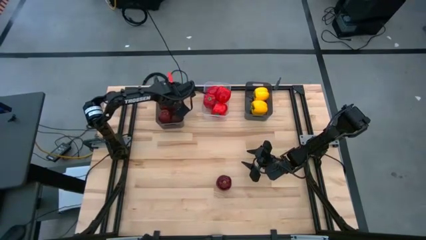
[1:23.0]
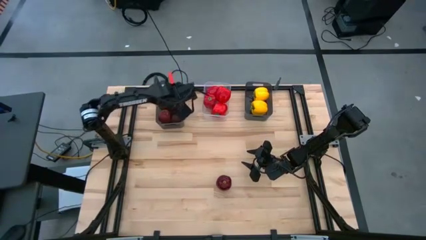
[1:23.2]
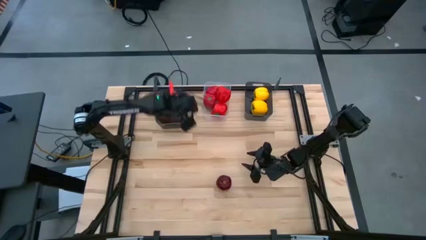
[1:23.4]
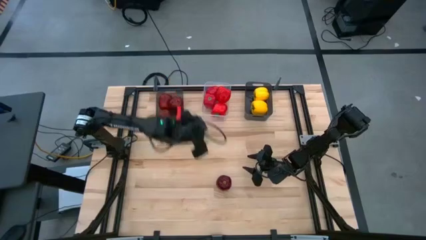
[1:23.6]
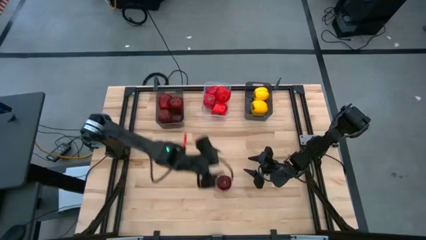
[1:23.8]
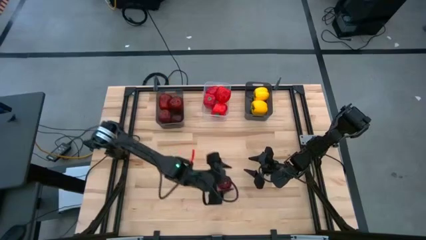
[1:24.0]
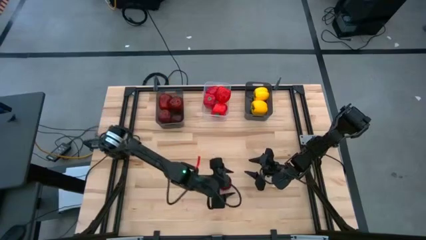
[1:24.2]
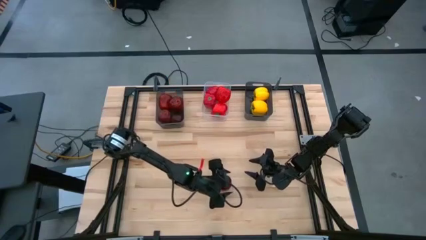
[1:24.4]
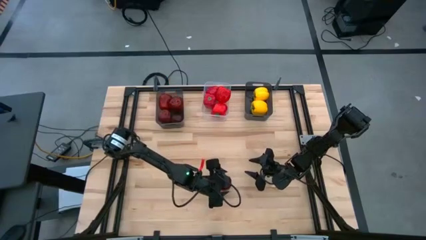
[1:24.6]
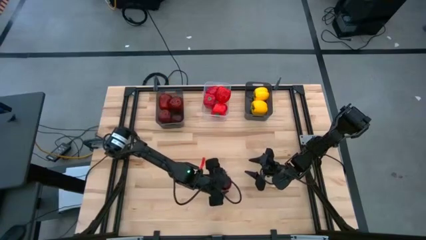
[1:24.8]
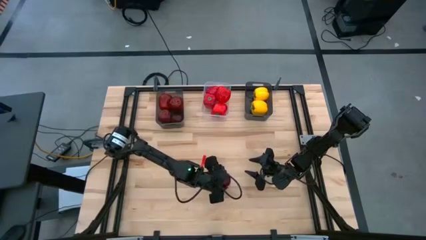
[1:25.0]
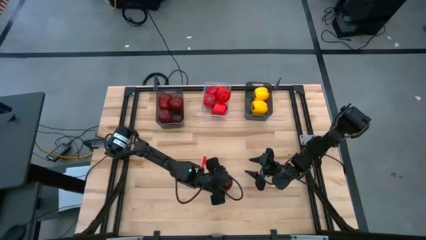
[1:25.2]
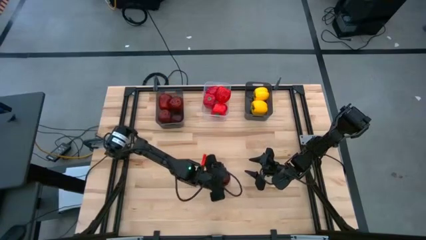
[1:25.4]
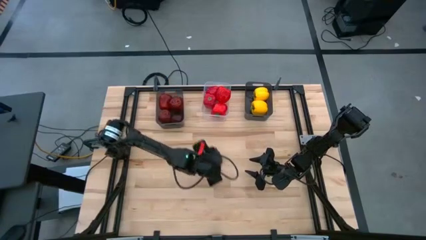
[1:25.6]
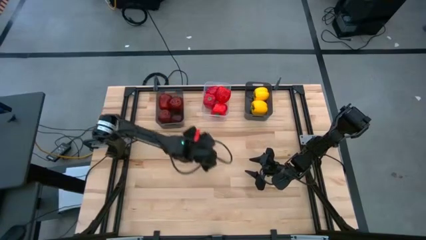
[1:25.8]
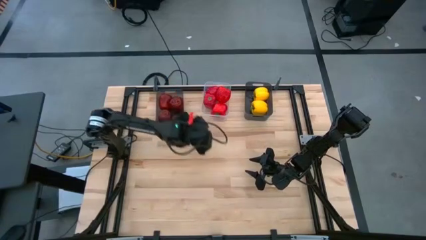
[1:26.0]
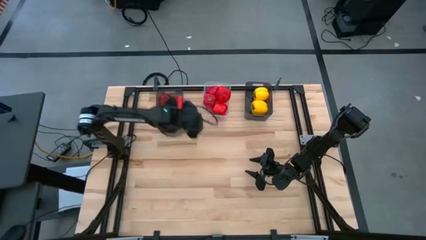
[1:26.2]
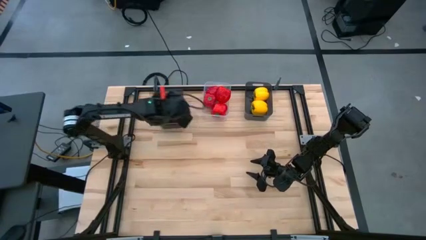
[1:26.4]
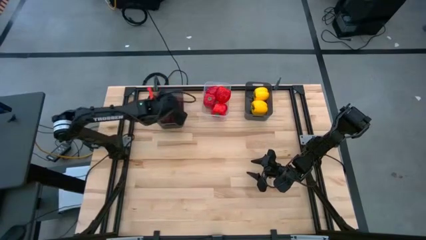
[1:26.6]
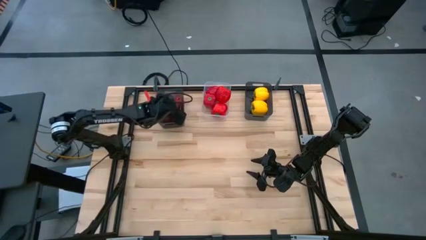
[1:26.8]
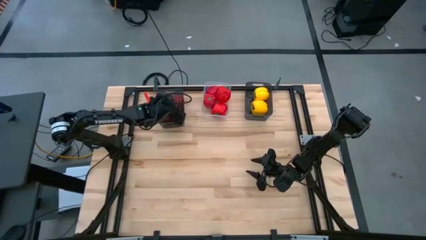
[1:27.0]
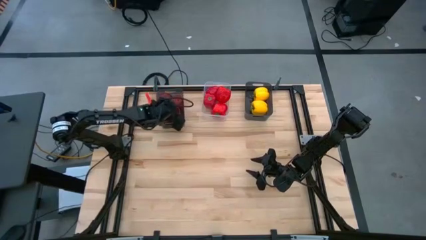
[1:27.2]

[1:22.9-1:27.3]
Task: Sort produce into baskets
Put the apple into the left black transparent bin

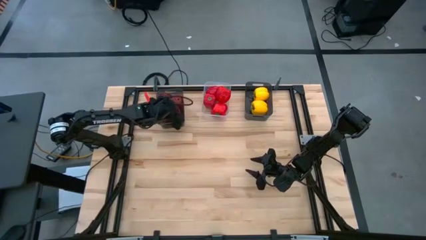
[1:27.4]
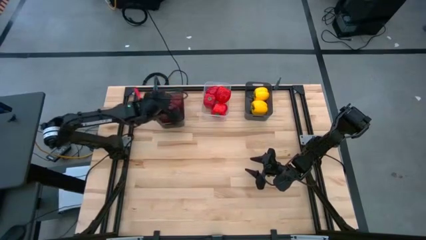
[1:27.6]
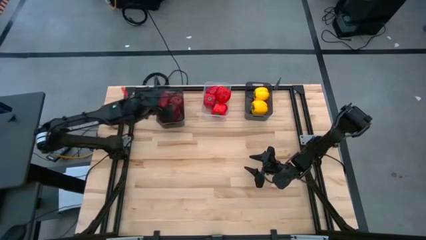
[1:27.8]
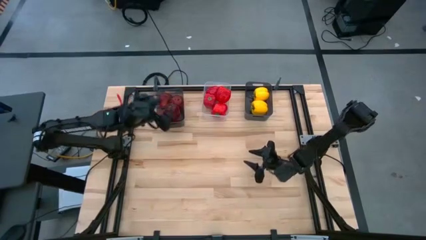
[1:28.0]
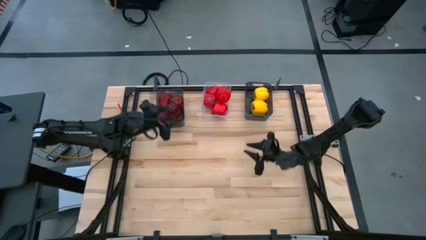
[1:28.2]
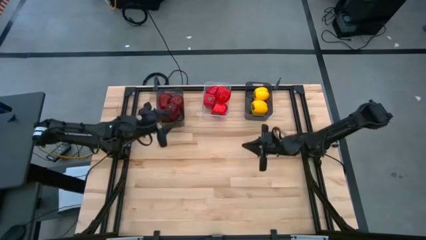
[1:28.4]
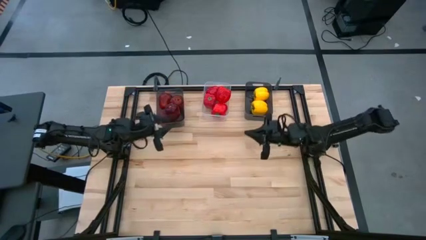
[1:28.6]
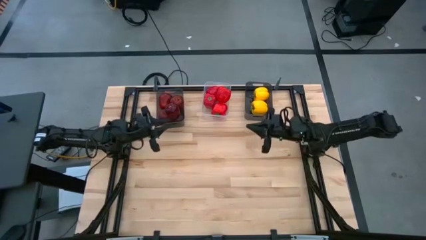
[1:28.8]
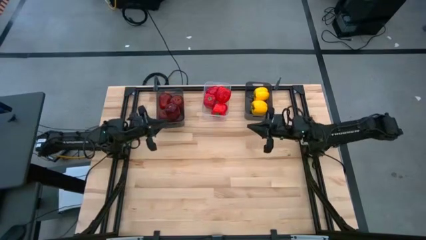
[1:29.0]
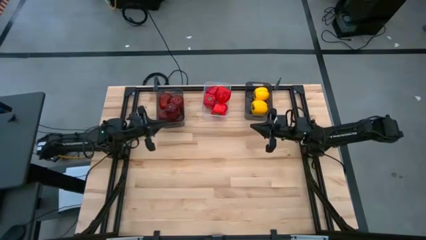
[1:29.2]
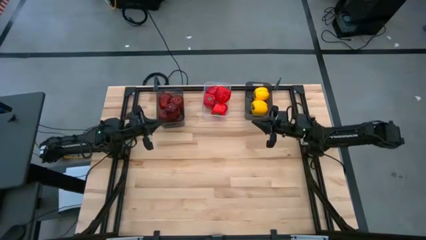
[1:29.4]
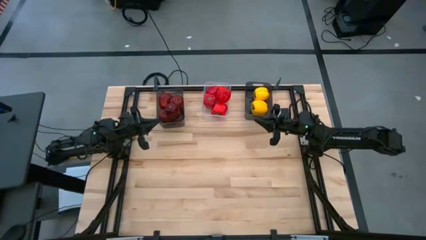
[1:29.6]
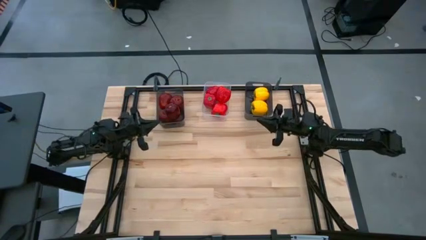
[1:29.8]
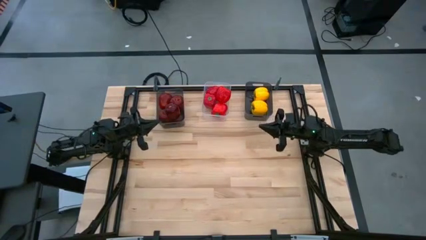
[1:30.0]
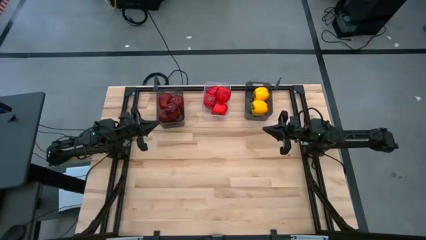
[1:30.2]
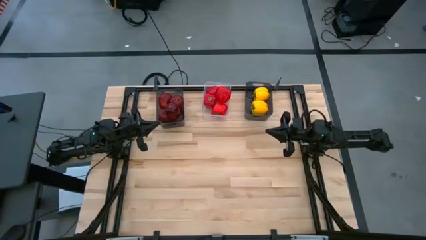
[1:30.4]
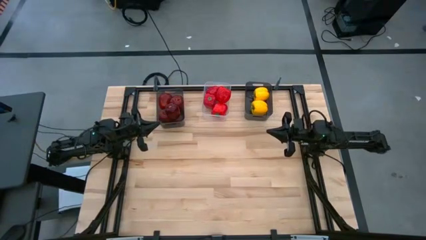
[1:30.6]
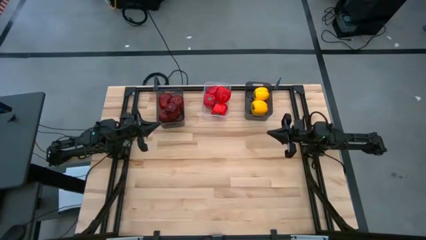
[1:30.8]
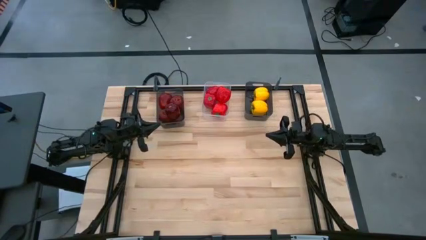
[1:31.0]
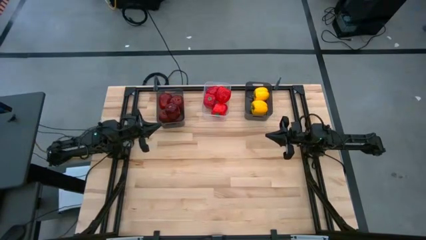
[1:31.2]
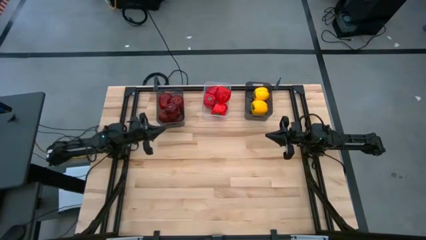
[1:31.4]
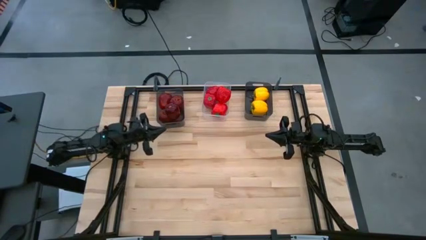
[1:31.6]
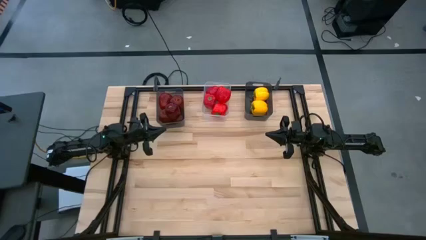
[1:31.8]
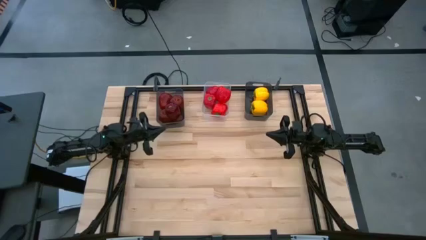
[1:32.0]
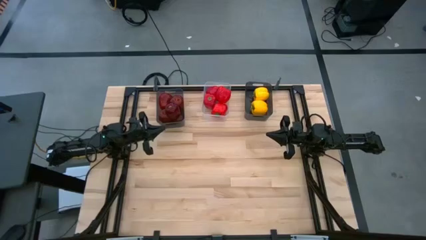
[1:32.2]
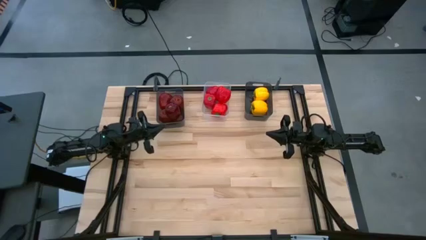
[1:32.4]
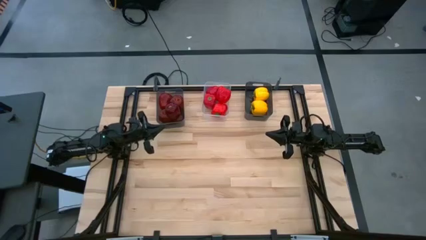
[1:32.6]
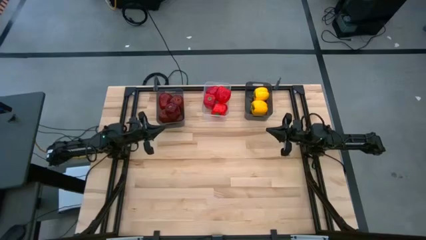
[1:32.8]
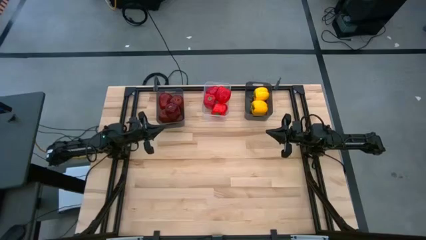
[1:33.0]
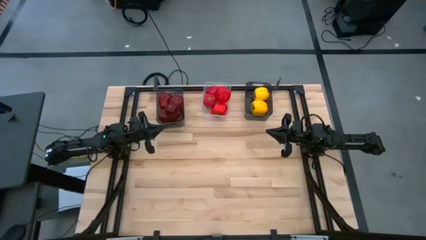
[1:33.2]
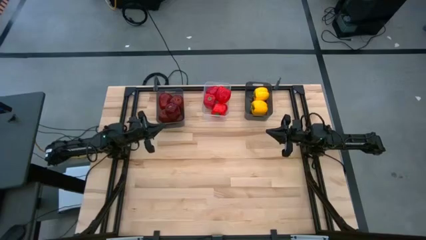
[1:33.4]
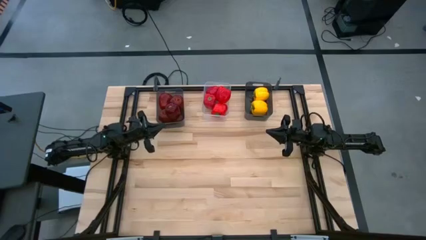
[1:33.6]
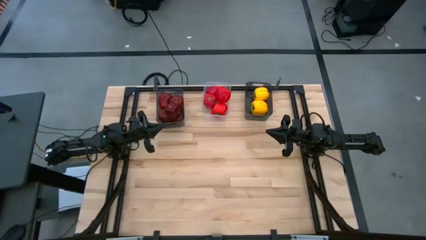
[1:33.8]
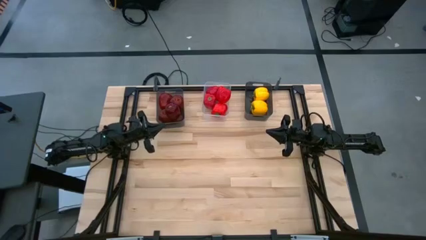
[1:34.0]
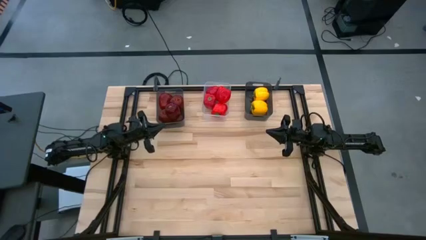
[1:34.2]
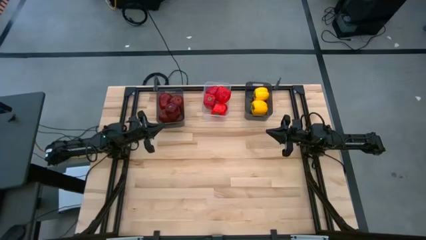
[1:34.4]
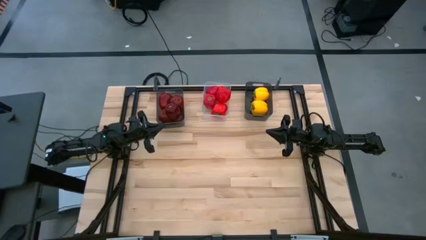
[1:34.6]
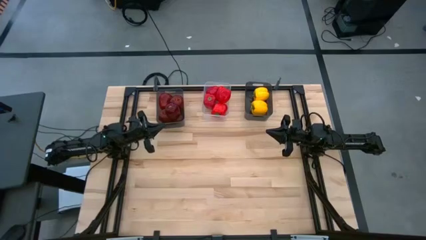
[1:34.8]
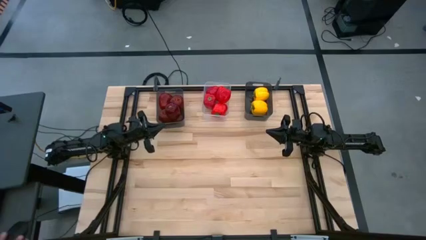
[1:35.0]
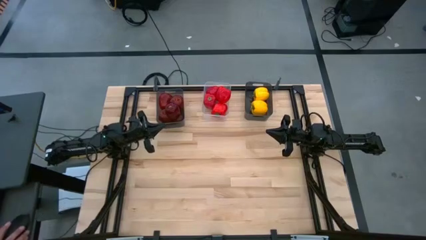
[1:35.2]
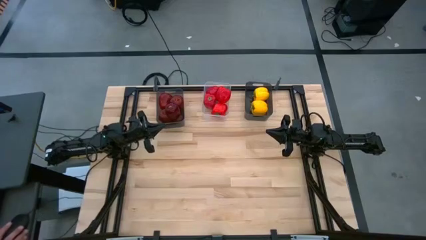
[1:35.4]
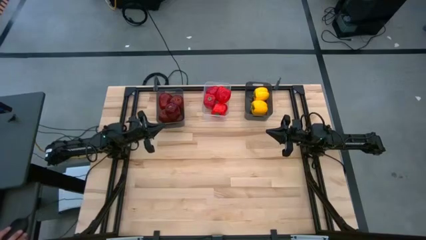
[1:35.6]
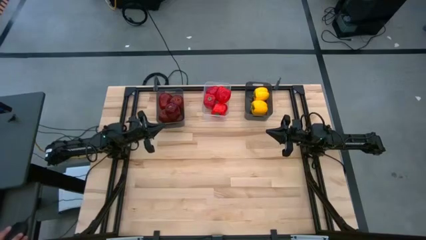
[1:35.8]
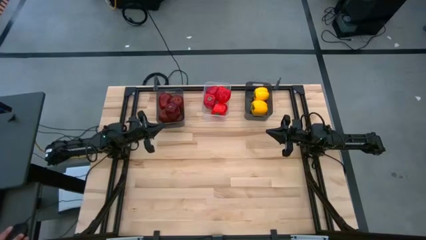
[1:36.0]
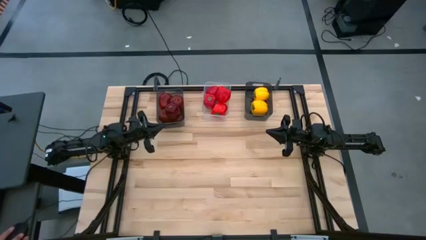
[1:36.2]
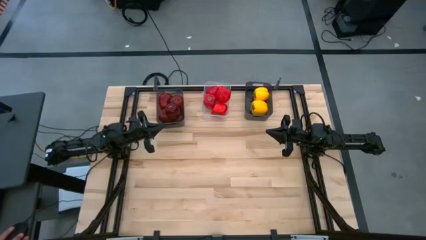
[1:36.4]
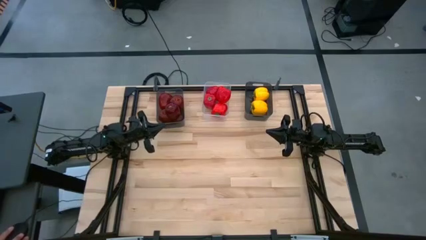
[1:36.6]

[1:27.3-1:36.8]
Return to Home Position
